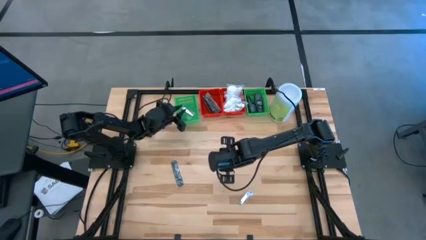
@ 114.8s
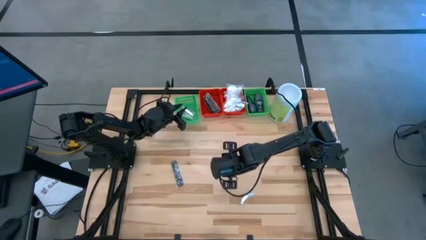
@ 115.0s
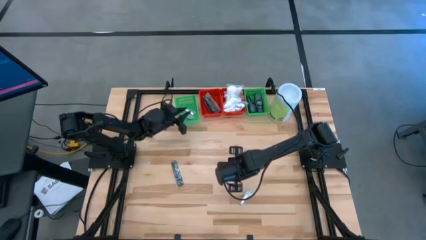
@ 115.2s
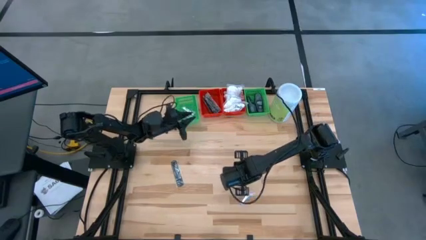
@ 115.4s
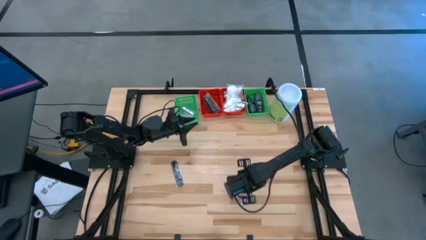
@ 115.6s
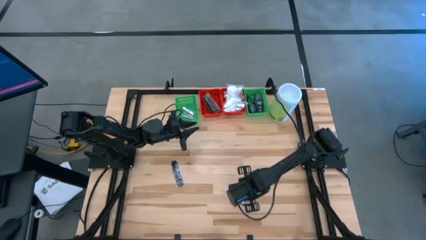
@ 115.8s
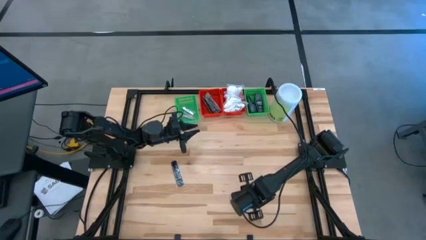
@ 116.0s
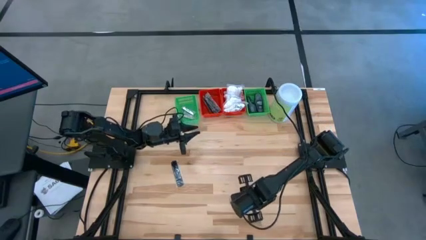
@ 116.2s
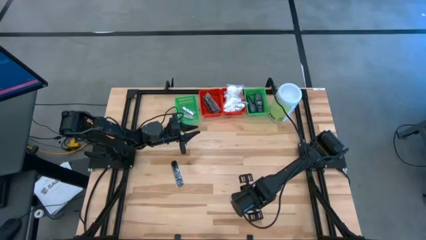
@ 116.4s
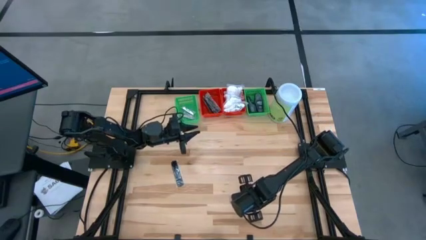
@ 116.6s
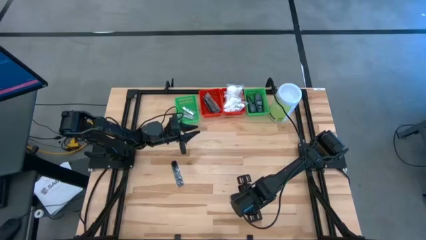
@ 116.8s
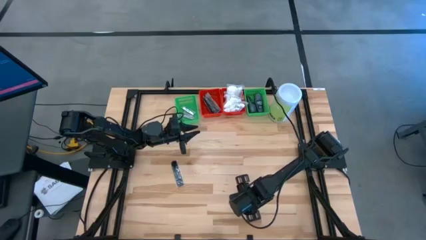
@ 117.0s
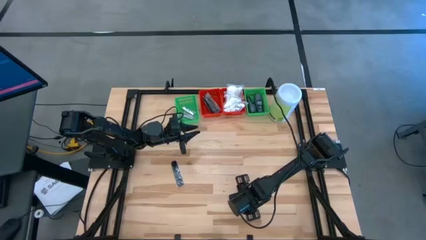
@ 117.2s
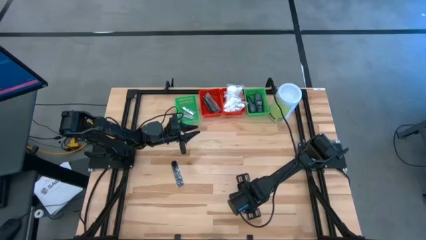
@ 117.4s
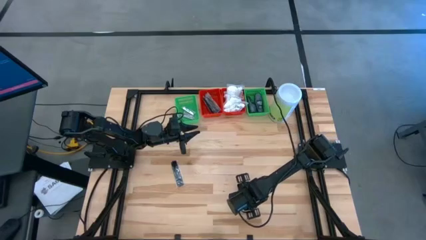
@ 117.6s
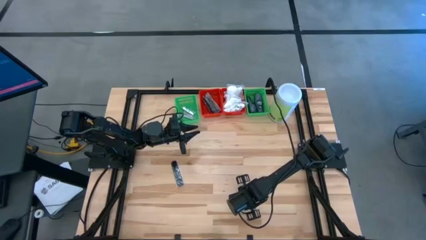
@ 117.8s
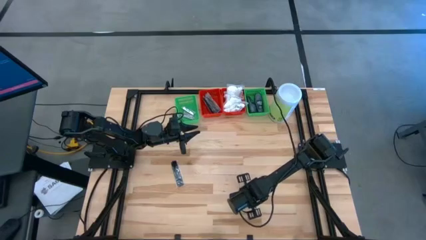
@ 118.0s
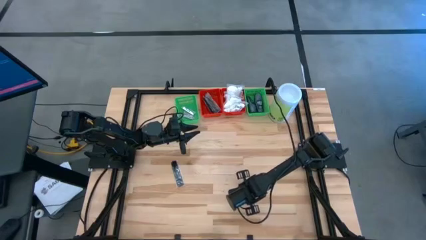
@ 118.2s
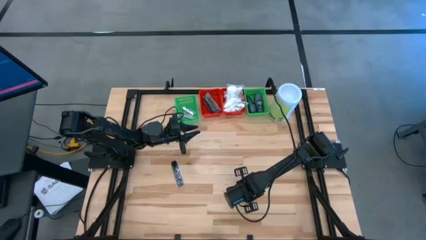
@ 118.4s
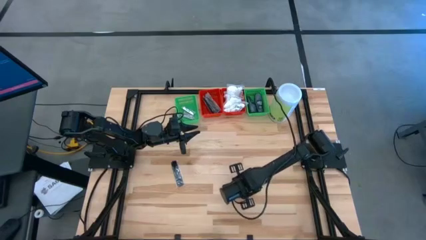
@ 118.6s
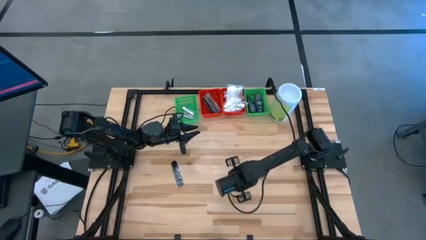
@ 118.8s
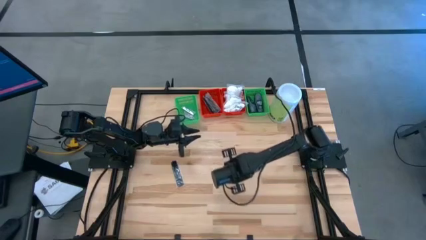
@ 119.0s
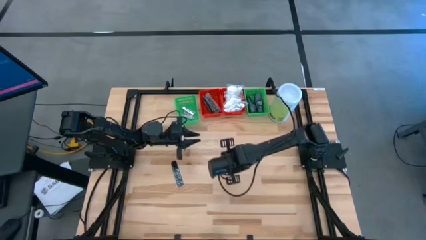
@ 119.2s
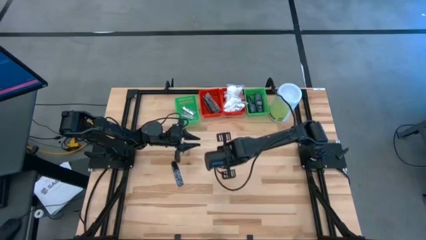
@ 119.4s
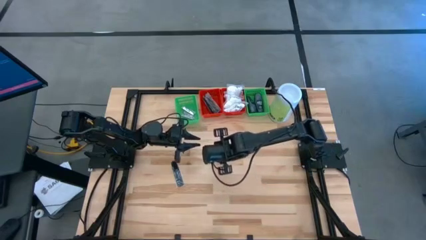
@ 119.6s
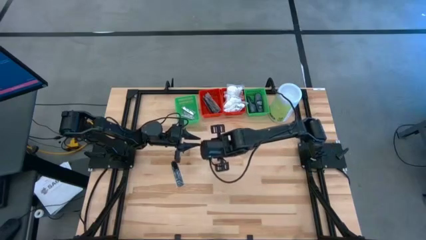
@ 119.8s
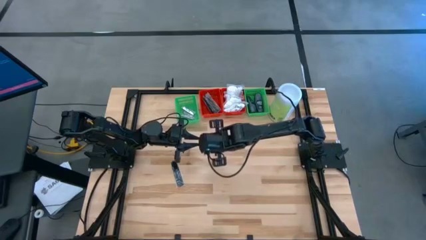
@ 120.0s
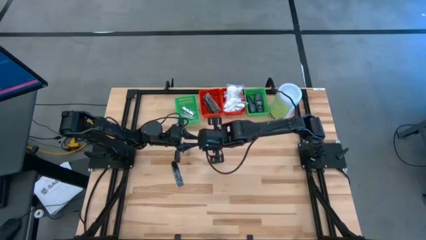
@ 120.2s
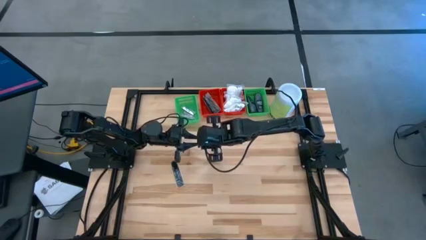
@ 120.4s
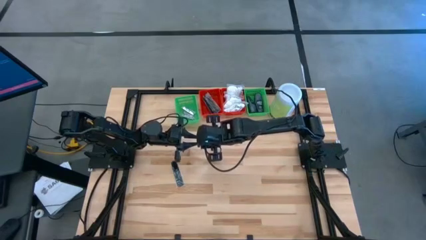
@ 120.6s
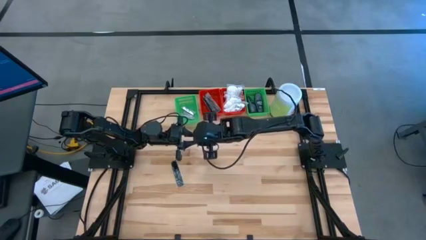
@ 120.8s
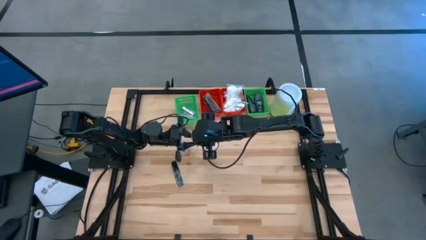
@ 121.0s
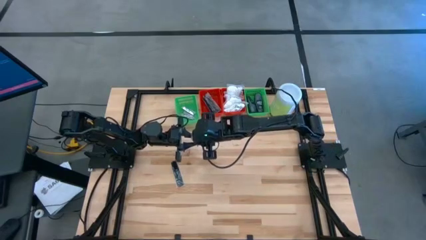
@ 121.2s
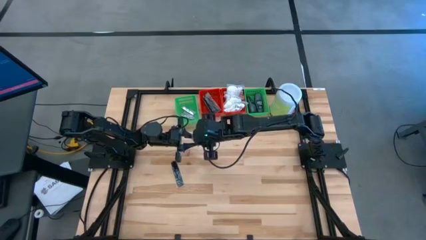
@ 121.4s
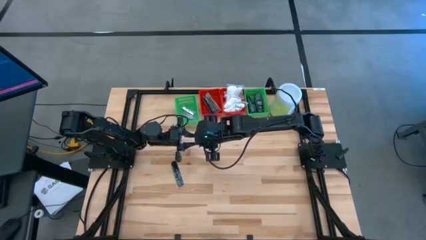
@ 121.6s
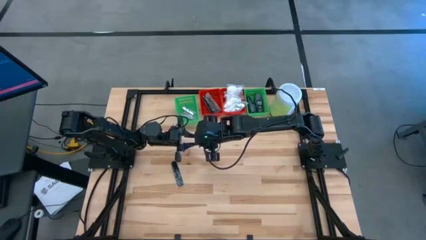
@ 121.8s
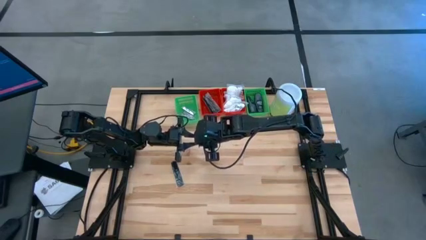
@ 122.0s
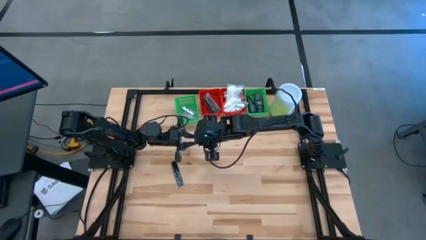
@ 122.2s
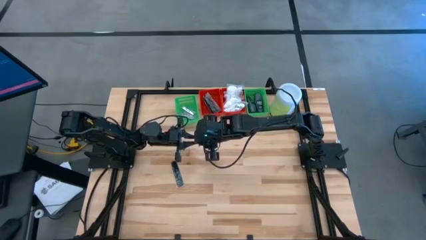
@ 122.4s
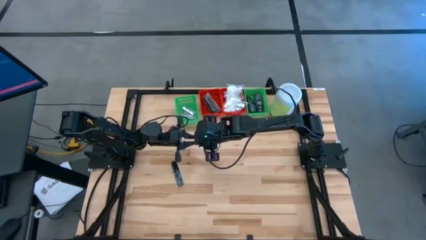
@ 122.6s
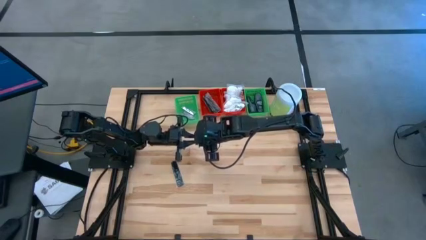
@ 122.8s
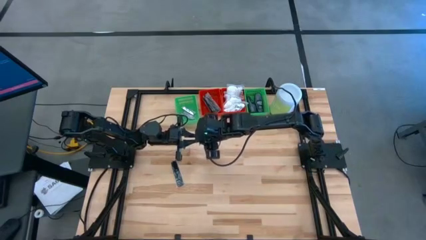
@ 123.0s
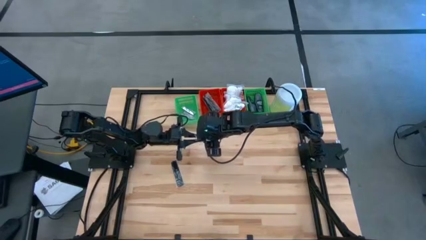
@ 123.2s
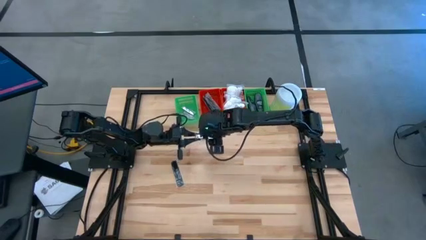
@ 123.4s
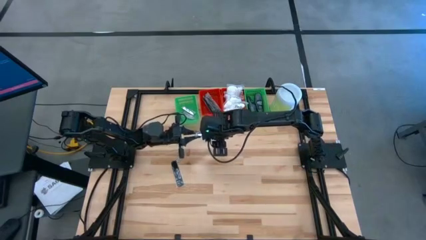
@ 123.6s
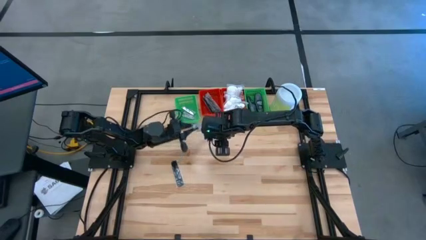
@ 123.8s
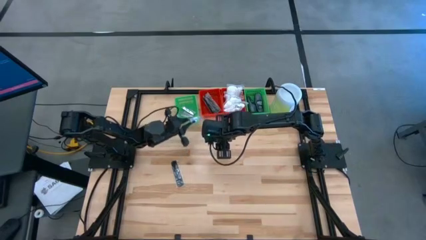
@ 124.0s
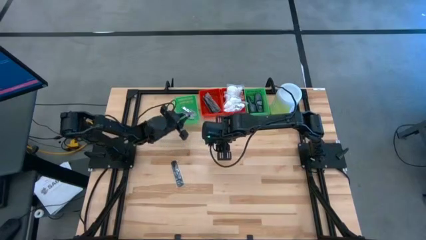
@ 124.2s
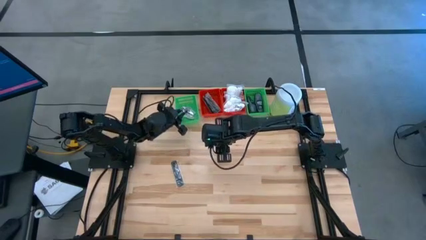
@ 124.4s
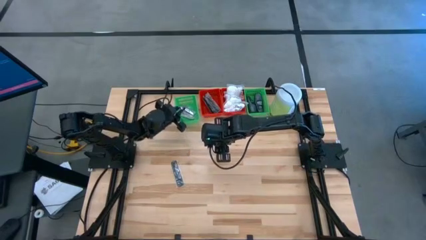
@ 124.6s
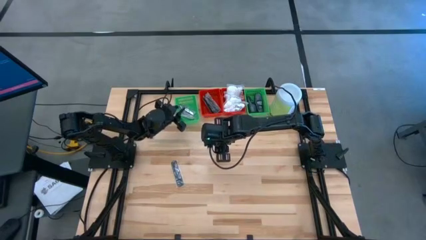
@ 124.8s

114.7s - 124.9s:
Task: Pick & Place Travel size toiletries
Put the silver nail cutter into the left green bin

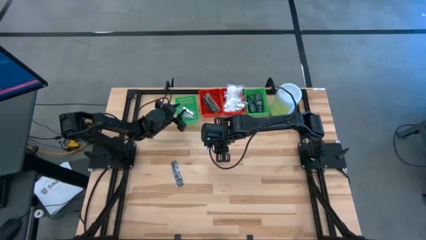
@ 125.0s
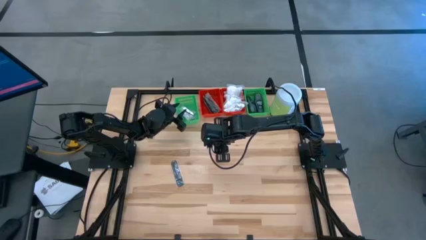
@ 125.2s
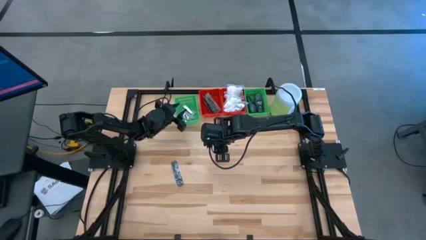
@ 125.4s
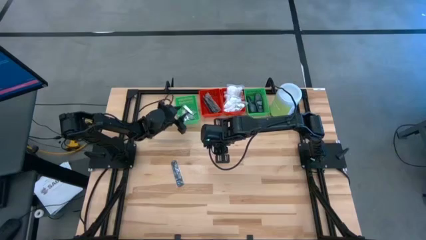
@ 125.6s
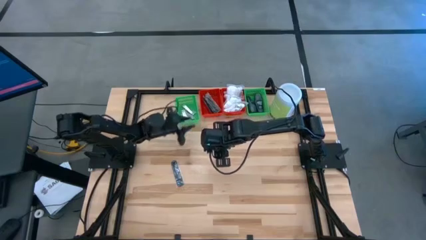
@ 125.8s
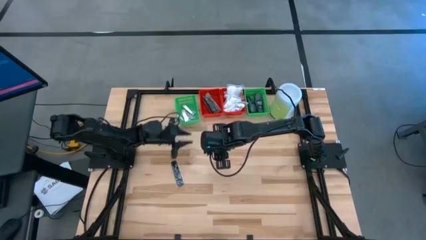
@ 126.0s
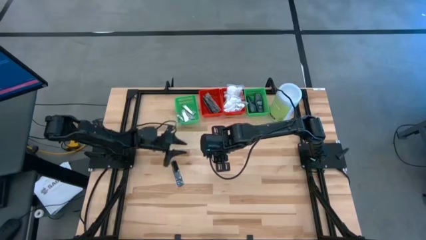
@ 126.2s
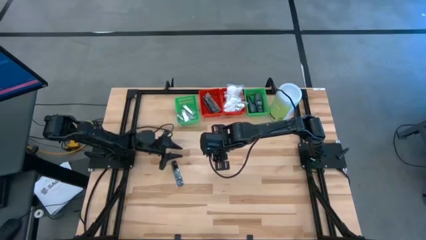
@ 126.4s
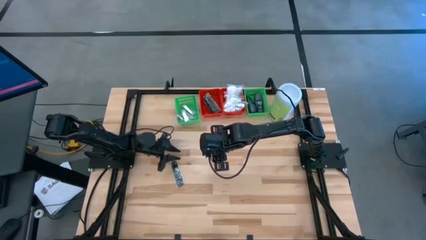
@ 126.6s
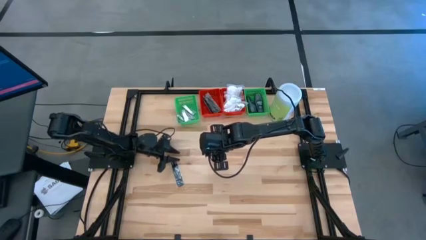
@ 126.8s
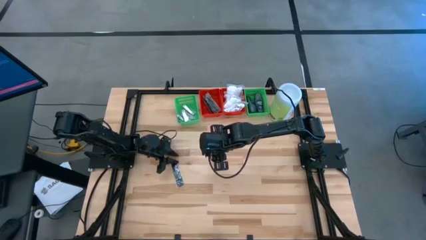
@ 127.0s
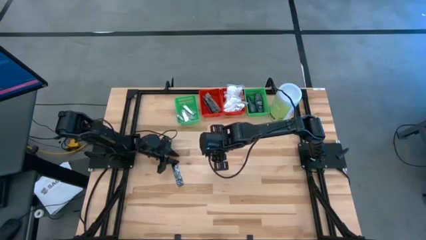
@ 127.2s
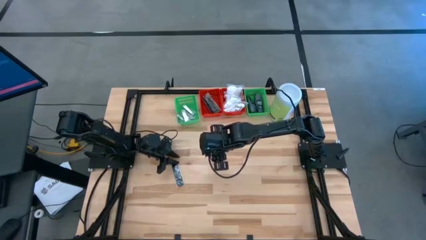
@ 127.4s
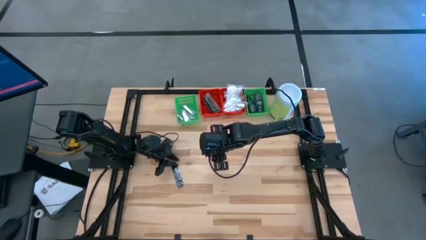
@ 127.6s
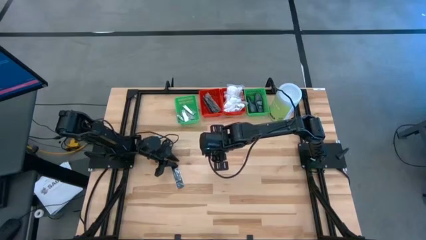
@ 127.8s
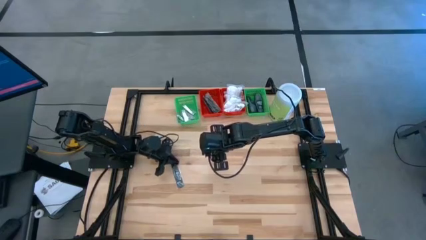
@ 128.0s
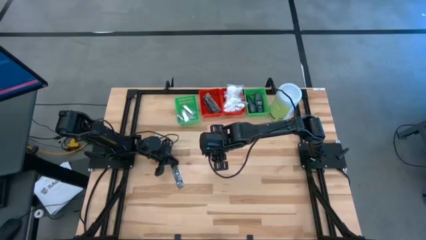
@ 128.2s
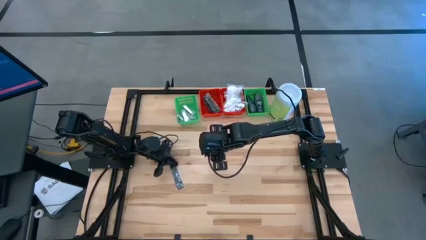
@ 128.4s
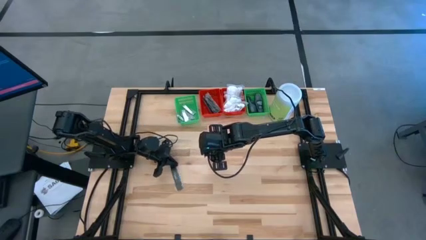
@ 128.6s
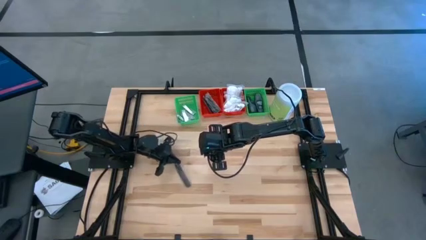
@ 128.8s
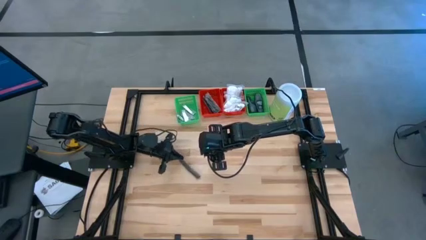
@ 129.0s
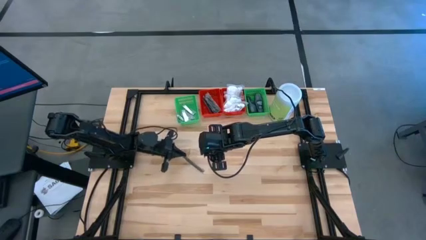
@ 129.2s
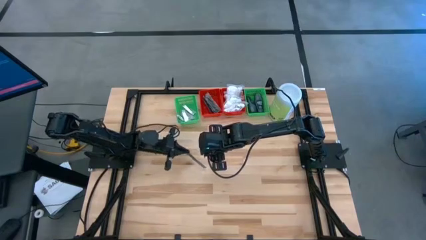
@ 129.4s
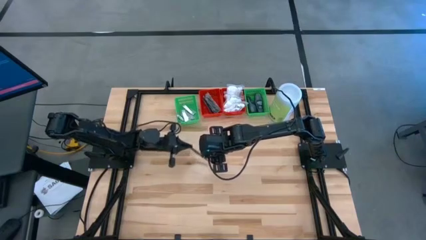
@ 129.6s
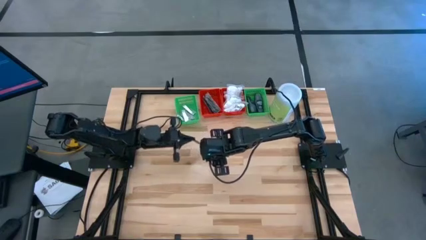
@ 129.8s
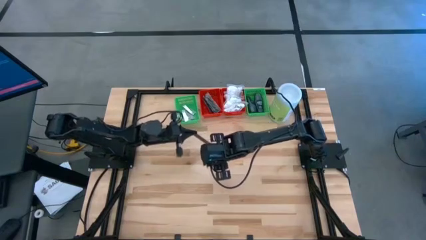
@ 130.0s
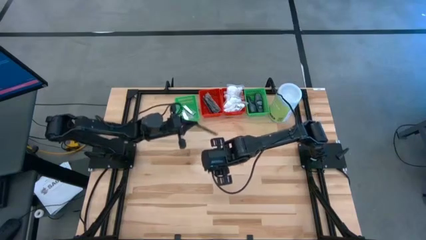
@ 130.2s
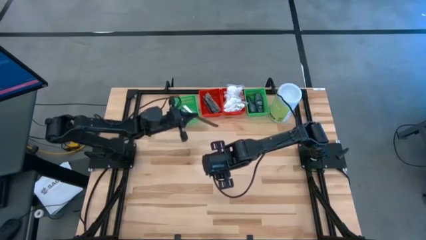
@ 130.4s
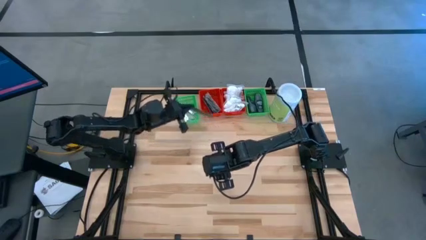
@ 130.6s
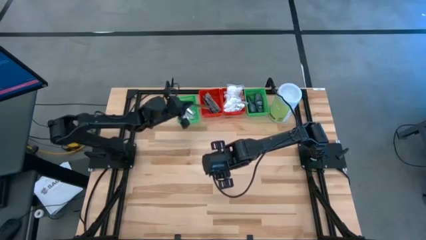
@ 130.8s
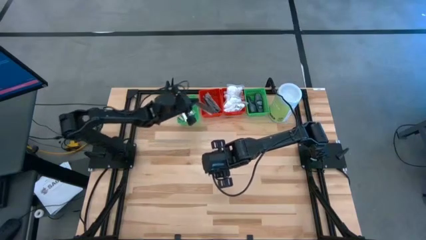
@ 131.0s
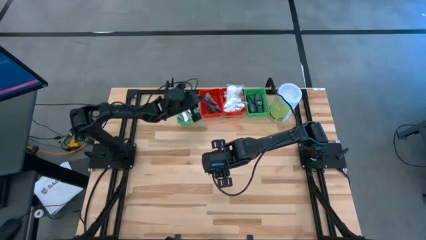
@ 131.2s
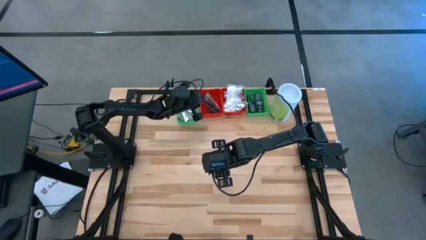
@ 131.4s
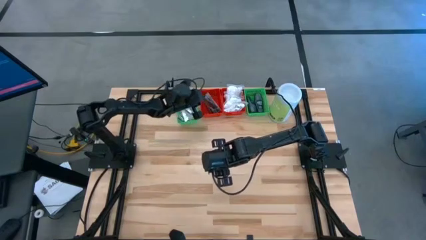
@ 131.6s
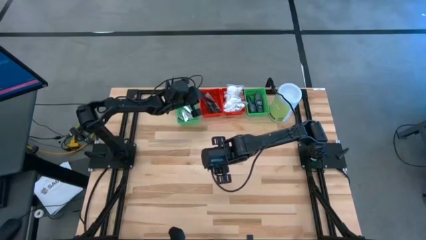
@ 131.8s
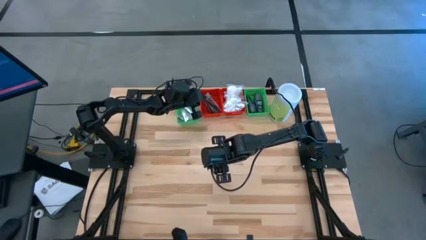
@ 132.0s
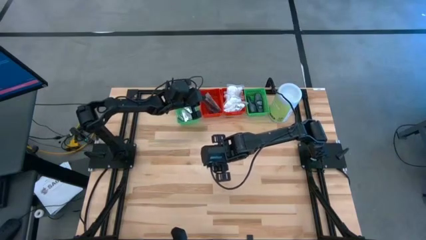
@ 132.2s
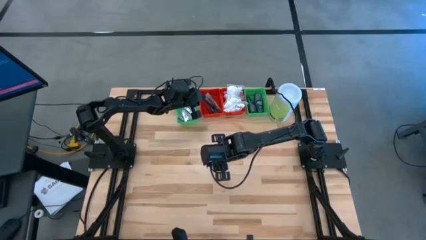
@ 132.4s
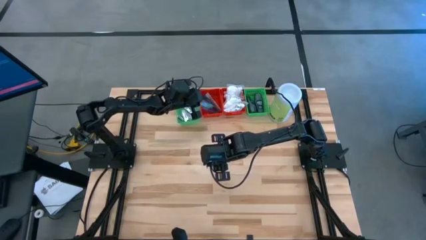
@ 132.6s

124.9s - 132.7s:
Put the black comb into the left red bin
